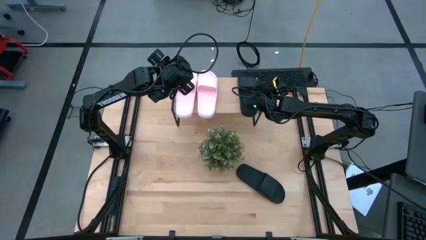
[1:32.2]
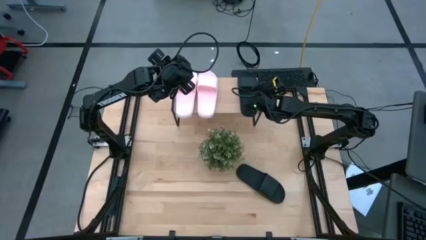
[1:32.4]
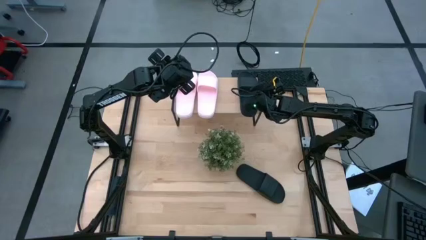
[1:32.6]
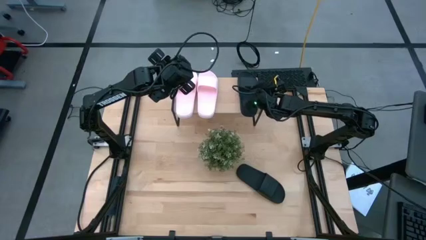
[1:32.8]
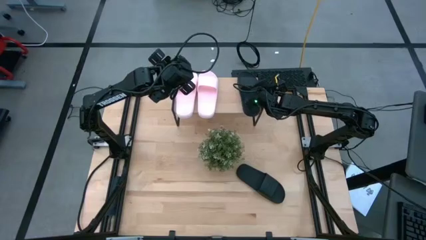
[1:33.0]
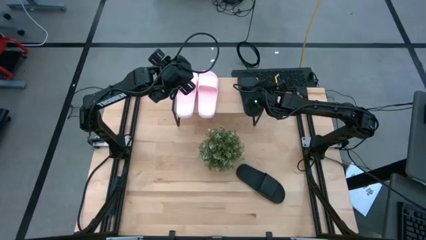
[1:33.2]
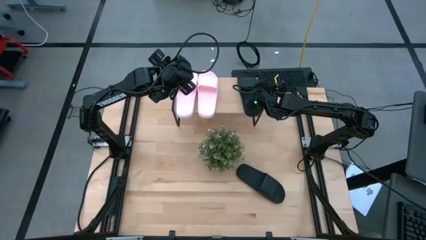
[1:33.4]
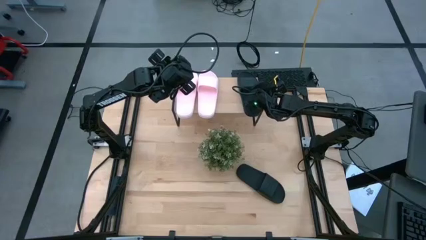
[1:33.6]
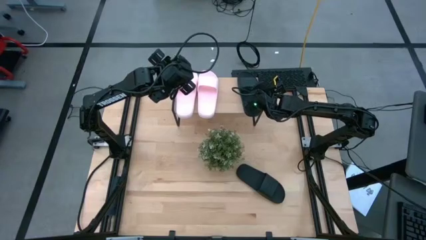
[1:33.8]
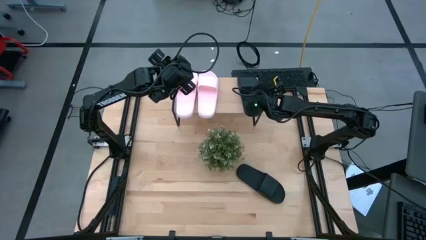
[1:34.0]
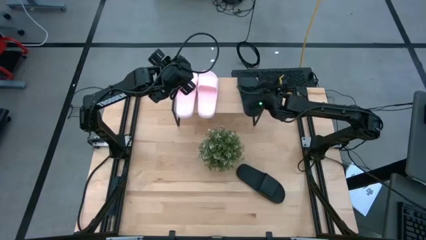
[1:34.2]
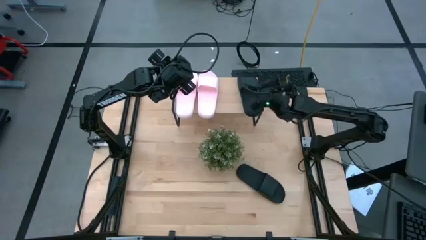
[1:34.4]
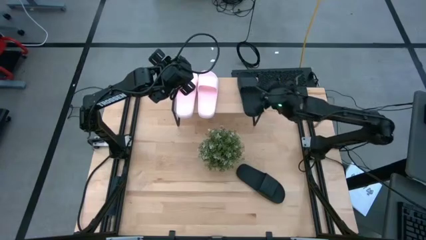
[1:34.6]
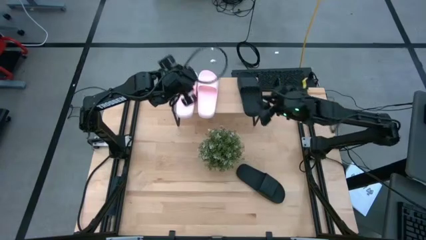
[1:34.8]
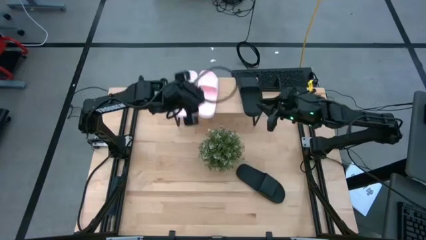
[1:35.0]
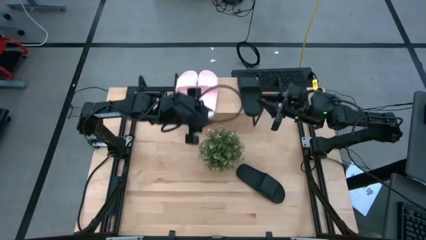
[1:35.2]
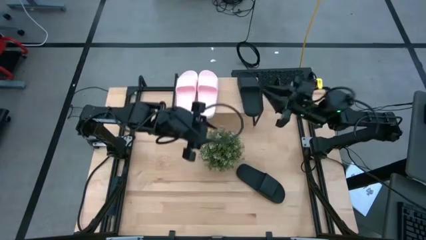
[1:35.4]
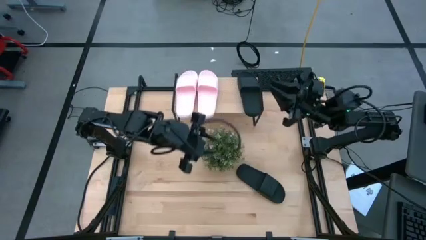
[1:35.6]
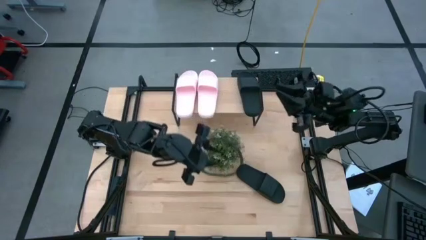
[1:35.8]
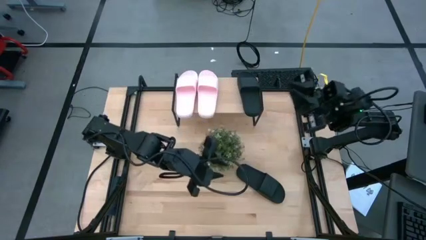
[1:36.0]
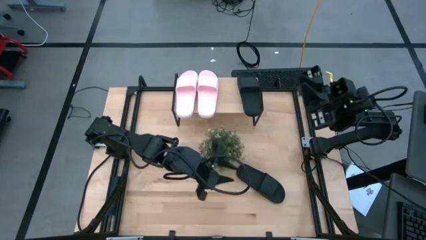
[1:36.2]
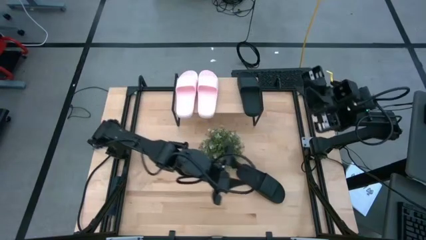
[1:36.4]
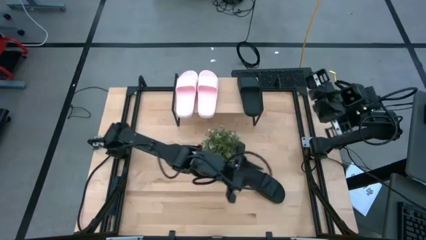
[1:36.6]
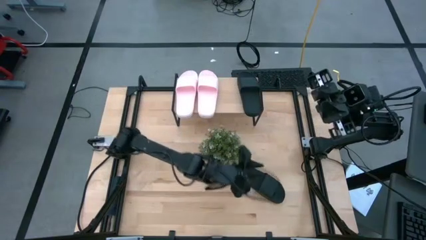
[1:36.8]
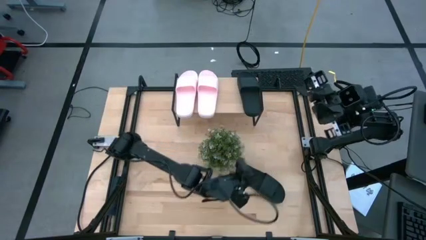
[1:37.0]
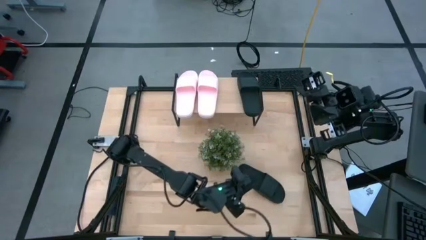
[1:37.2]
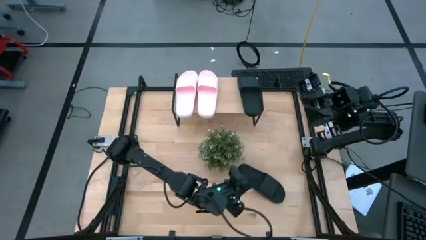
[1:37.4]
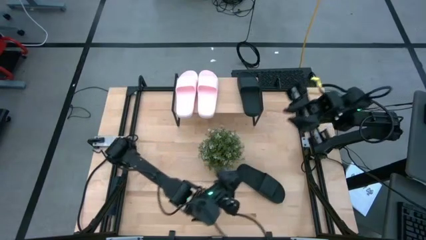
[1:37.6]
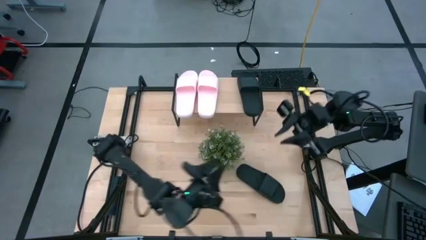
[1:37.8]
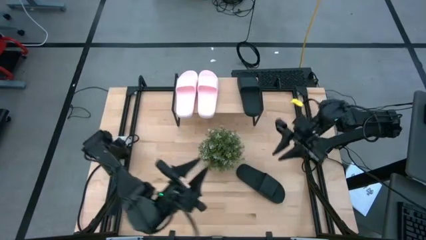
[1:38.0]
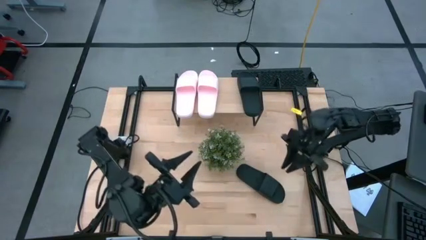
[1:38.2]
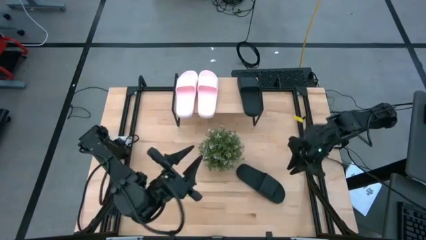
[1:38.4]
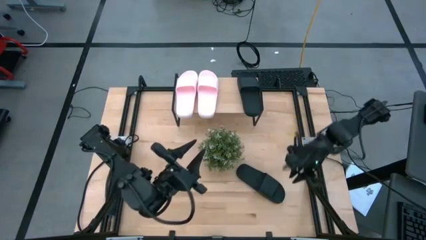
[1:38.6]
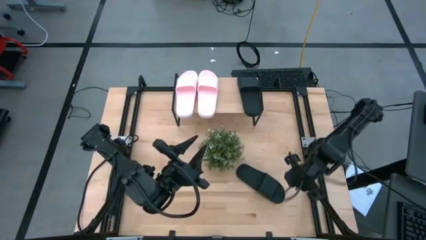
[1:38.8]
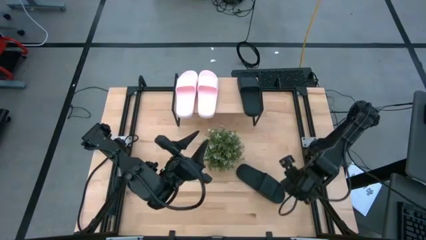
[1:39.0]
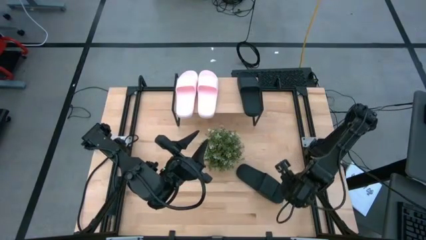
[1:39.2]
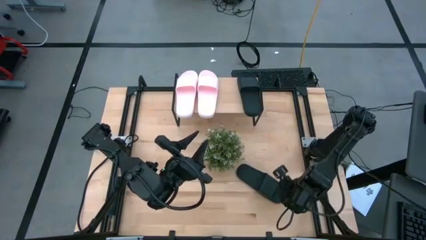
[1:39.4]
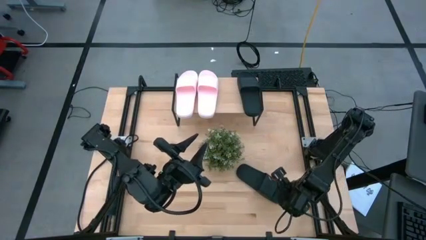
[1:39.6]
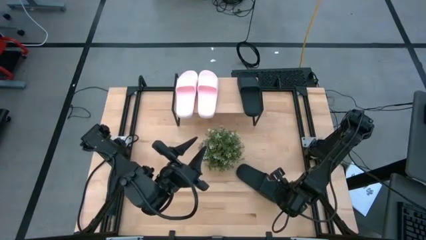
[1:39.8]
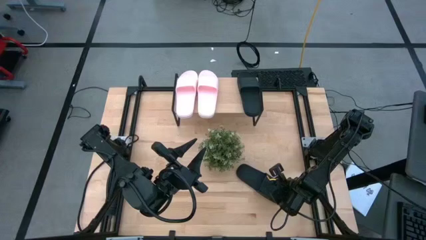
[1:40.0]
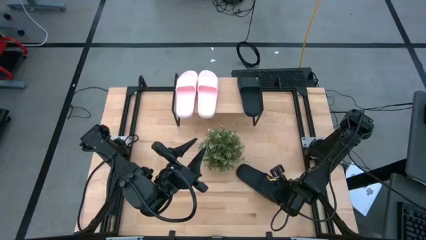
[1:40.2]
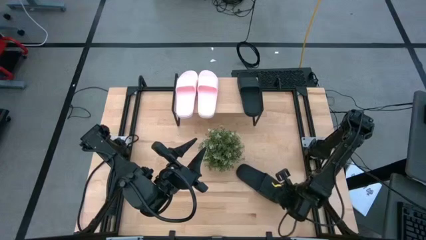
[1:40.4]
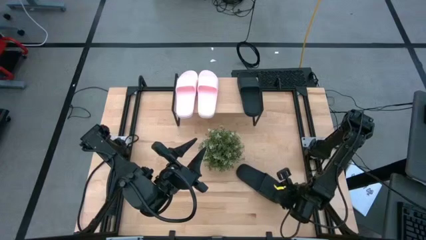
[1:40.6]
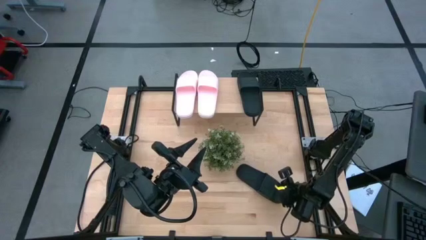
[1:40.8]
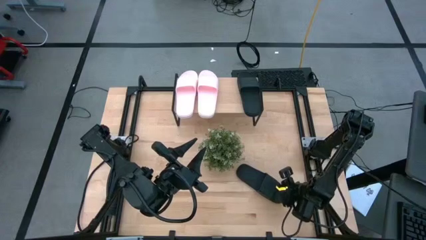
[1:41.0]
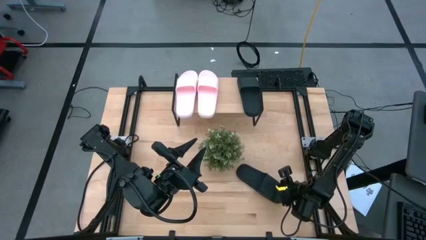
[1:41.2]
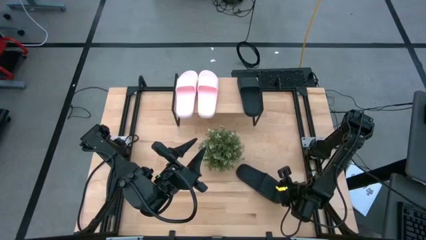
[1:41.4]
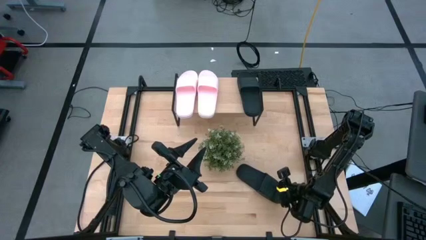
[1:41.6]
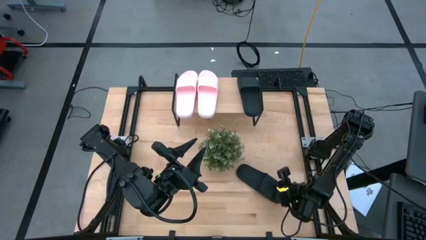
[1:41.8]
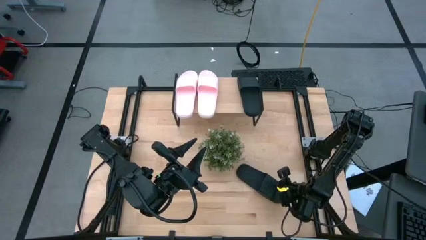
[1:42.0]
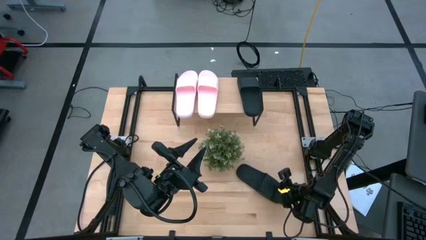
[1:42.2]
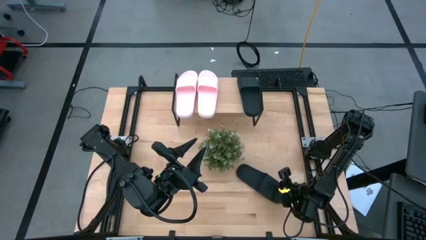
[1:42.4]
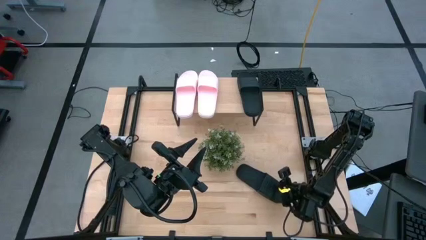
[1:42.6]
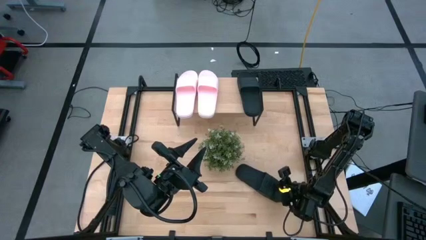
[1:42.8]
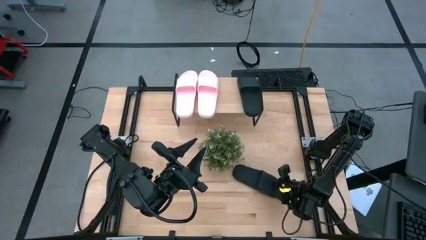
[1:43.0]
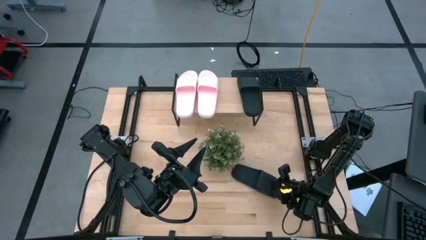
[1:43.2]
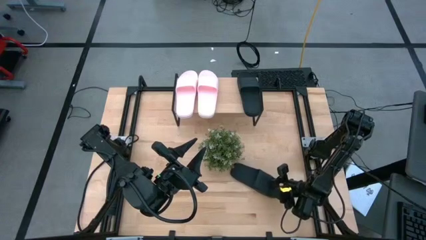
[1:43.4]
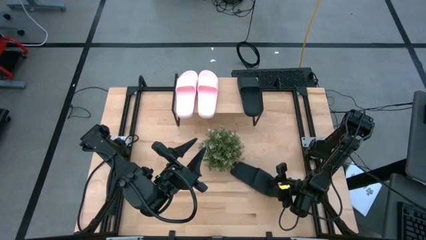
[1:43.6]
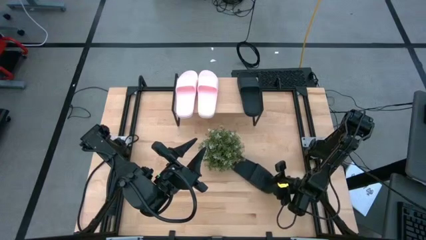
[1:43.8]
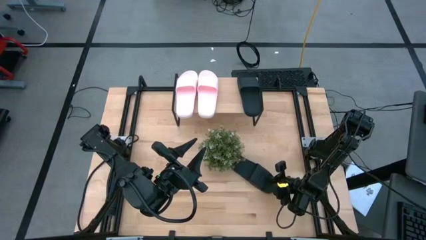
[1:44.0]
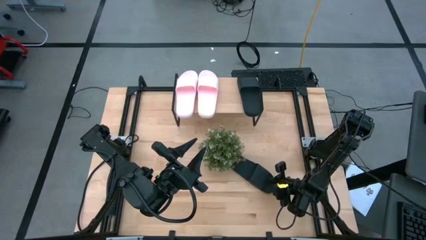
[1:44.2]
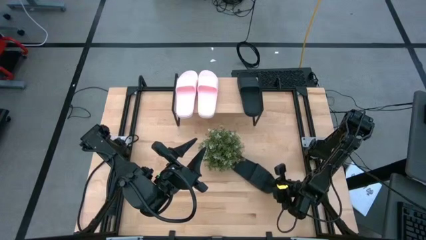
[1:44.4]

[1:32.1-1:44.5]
Task: Pick and place slides into the shelf
Put the black slipper on the shelf
